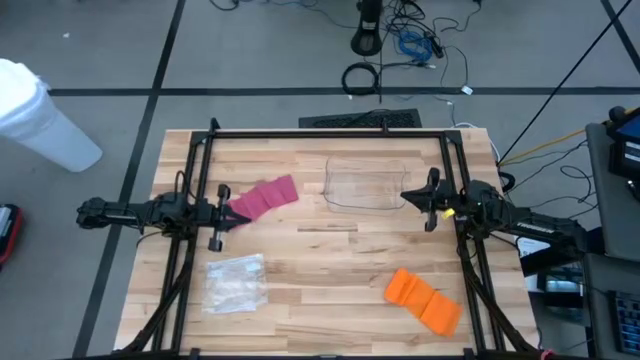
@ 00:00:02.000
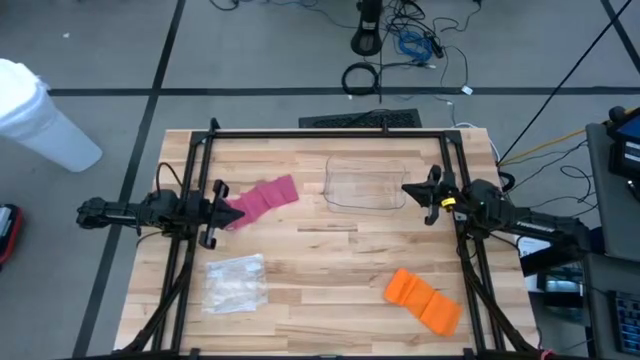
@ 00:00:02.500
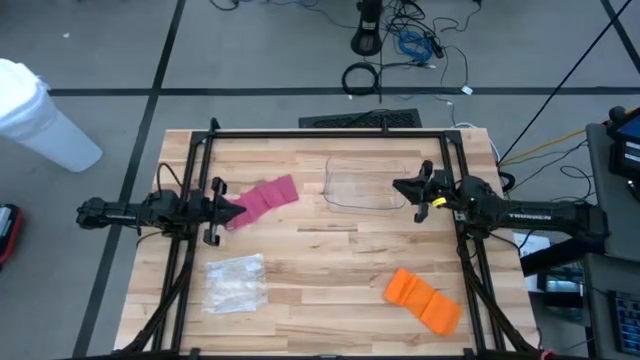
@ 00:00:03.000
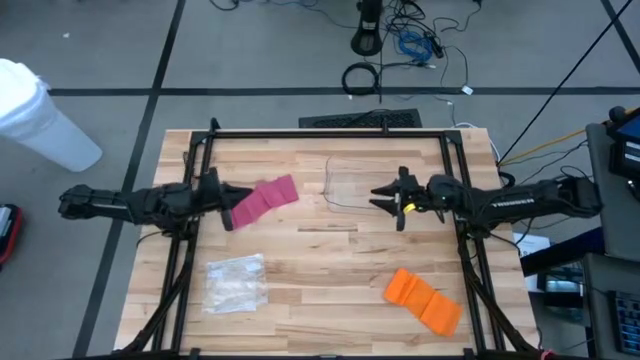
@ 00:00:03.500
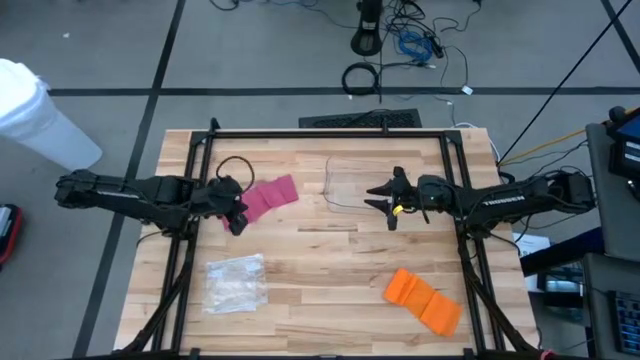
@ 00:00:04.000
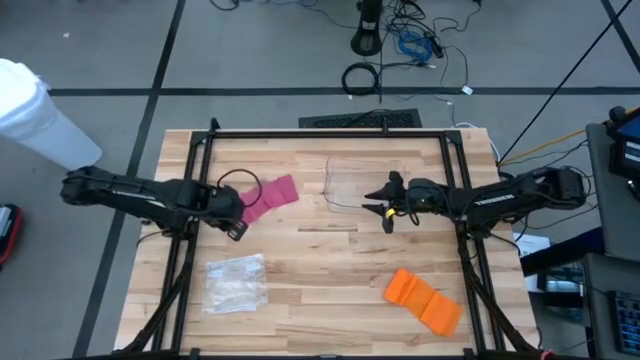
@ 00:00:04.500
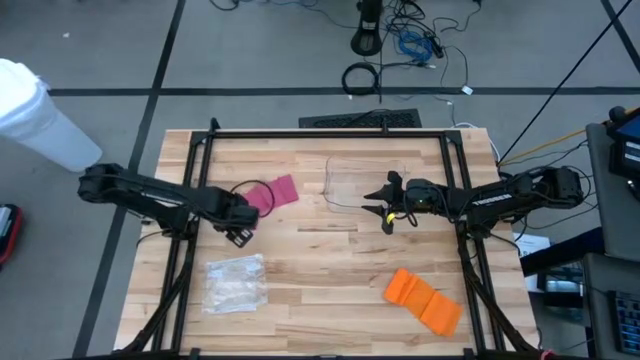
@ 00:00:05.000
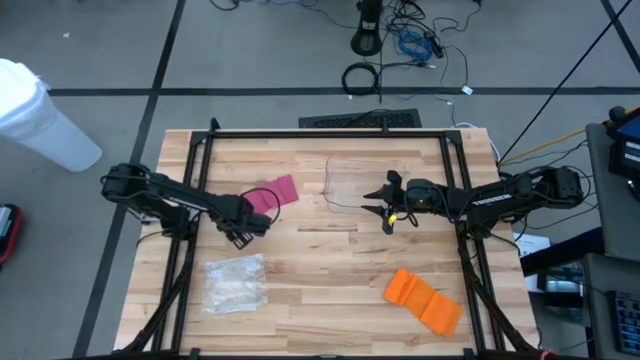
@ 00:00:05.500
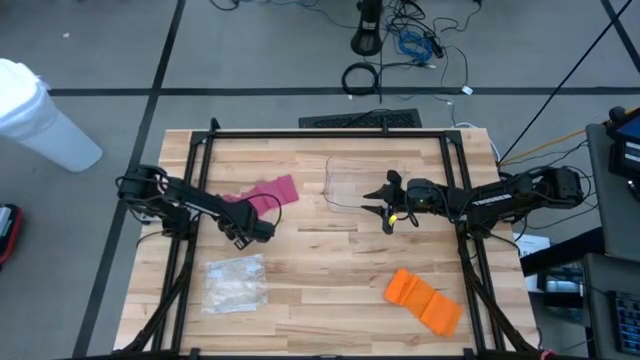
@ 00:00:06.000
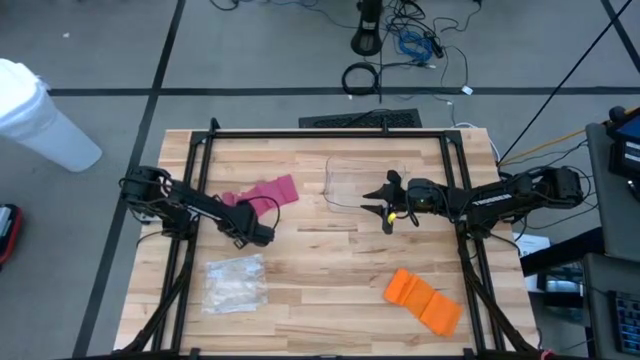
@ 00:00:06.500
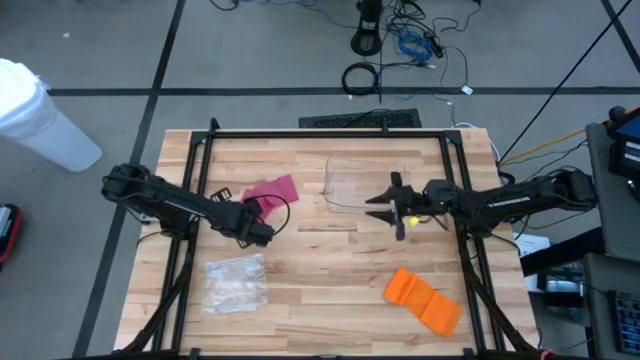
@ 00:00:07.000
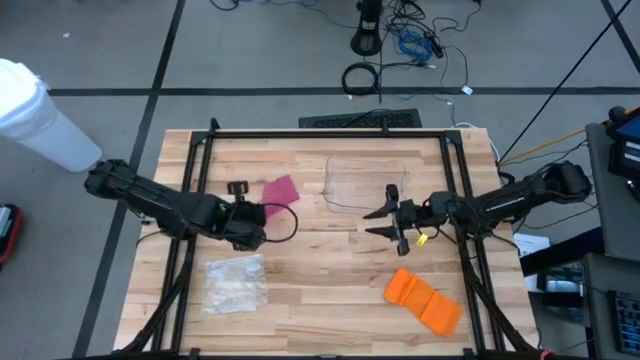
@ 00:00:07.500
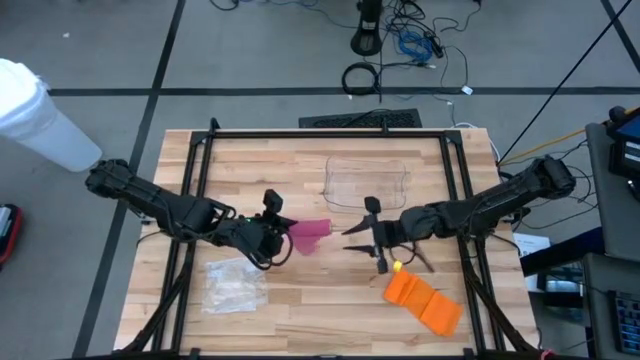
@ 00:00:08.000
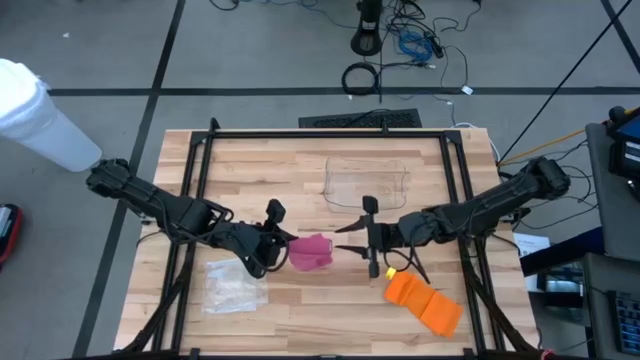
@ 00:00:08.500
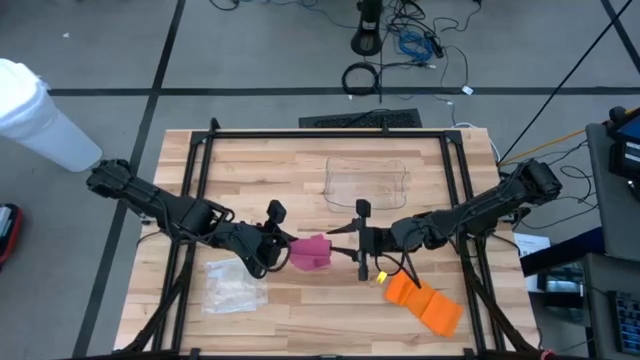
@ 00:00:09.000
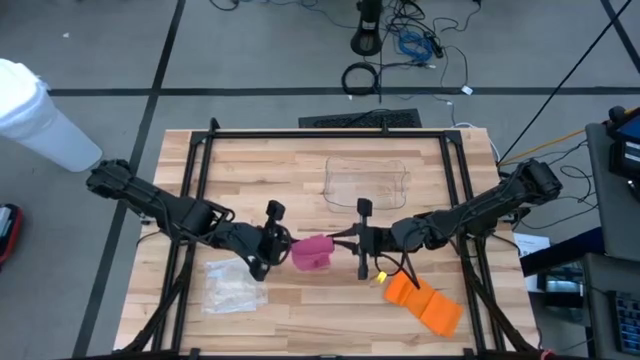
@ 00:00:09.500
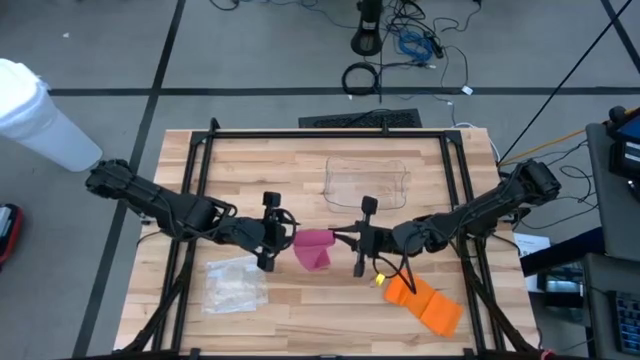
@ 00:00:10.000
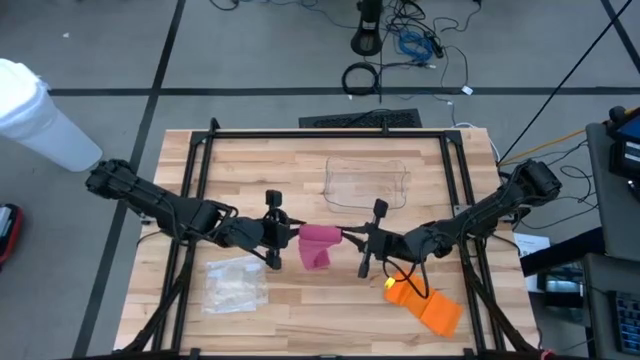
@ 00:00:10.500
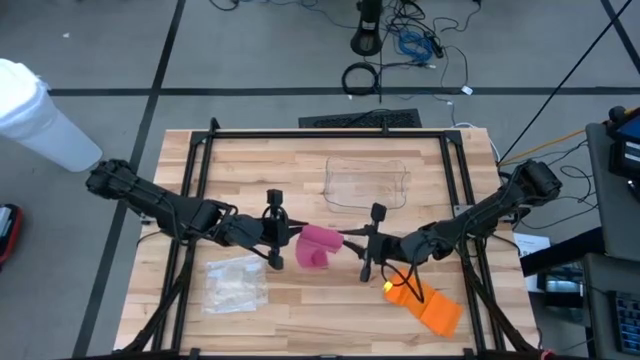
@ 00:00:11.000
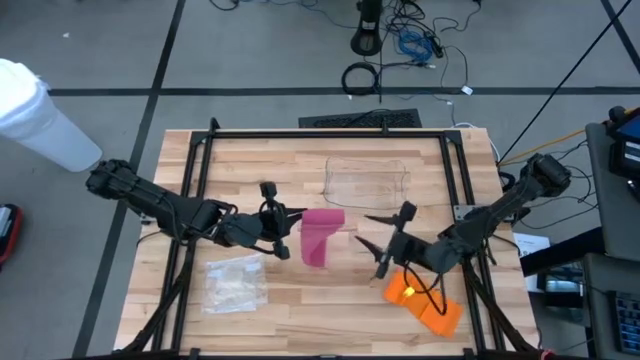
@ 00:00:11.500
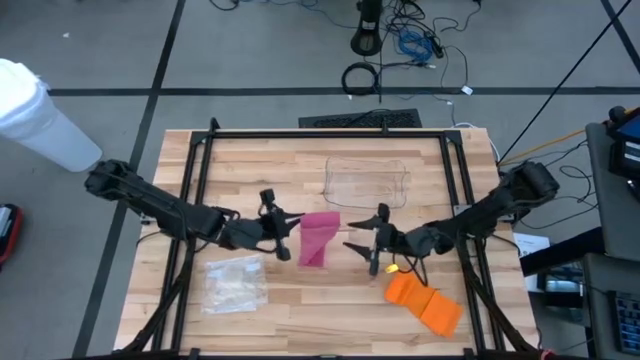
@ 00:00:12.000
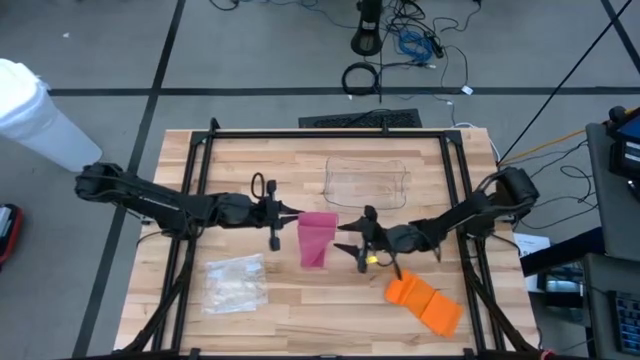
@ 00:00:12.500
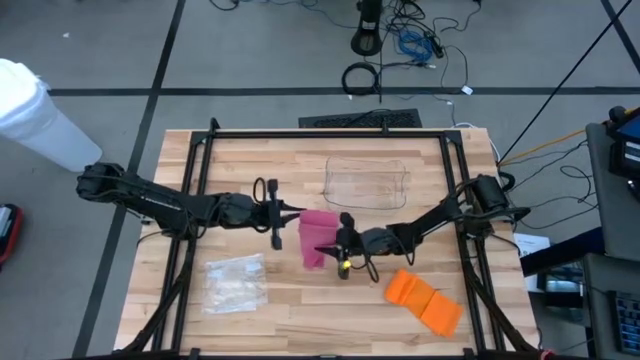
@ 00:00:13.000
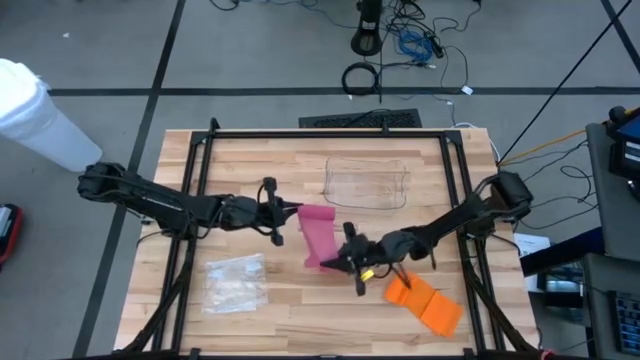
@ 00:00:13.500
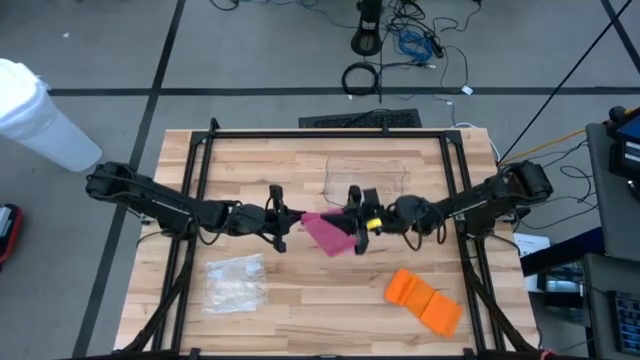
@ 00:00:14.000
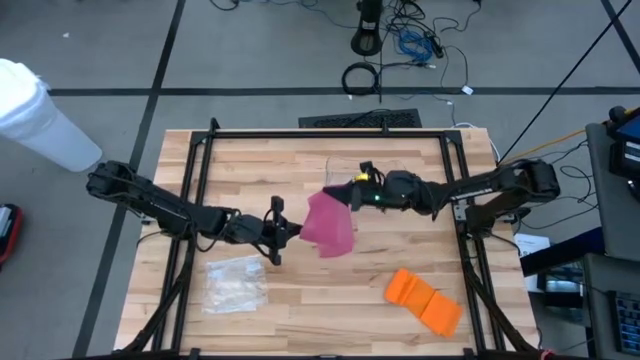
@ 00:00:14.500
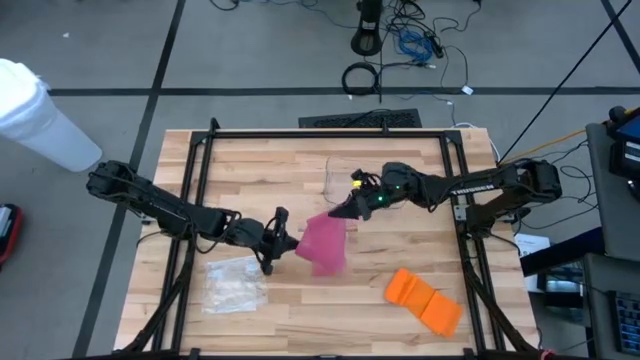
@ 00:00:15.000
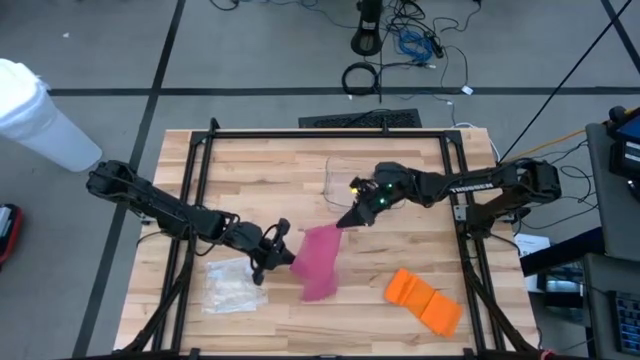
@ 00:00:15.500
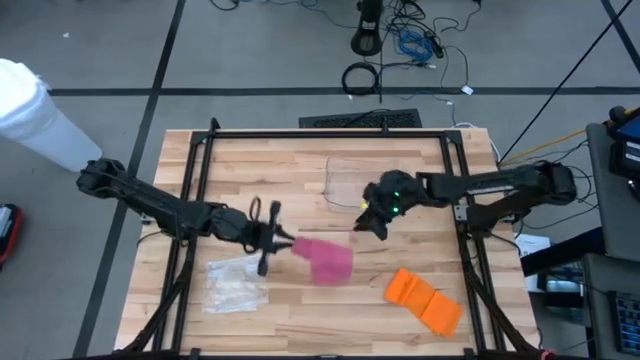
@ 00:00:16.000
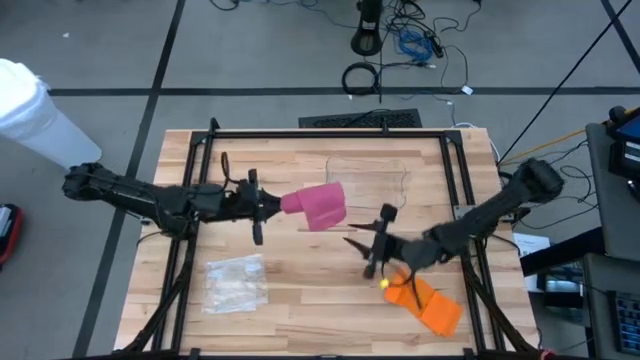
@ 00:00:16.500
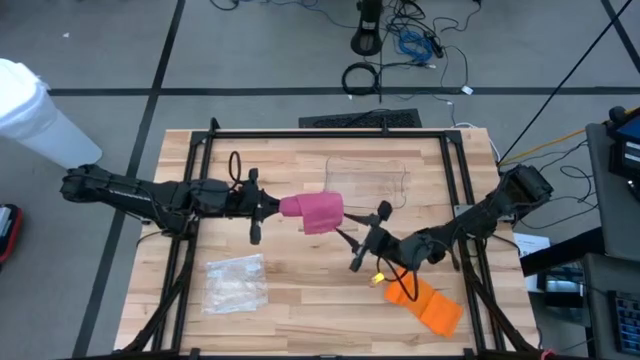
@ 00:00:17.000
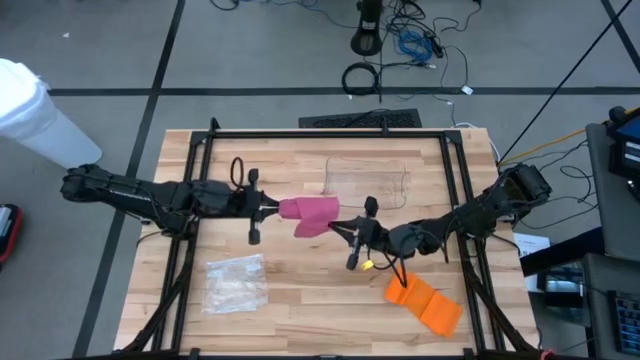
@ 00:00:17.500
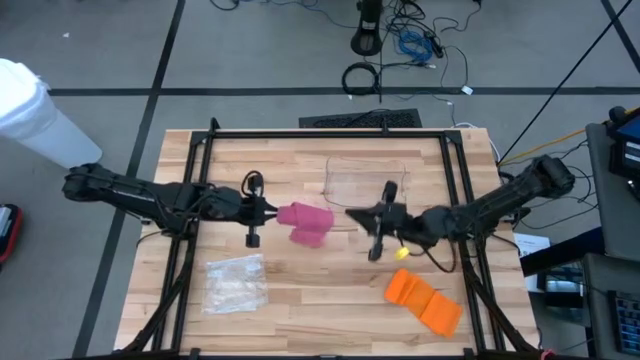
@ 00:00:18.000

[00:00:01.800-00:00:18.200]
Task: Roll bandage
Roll the pink bandage

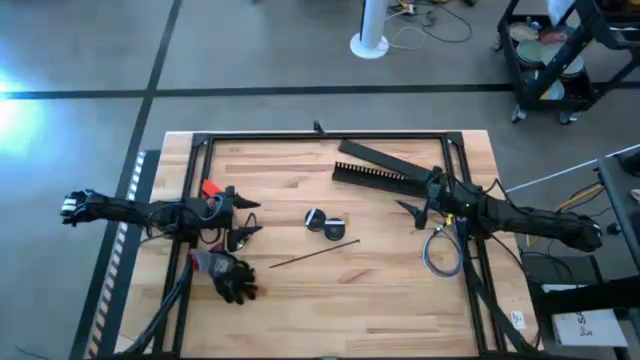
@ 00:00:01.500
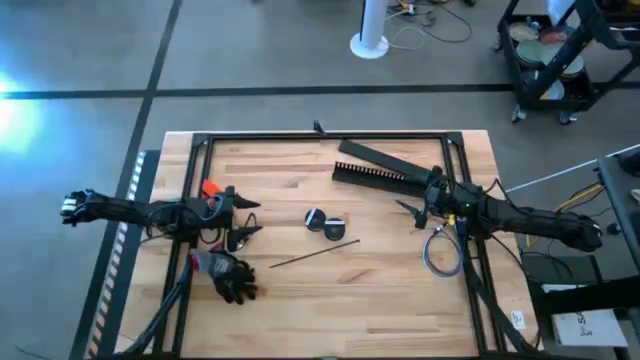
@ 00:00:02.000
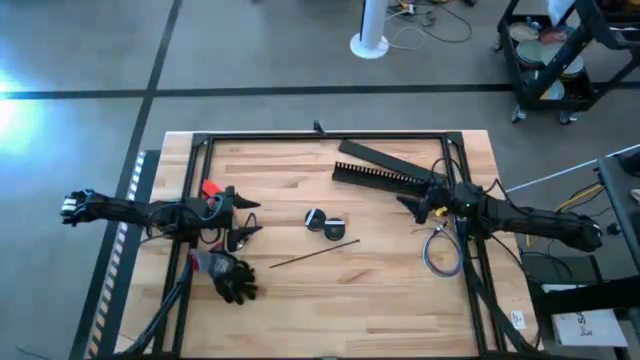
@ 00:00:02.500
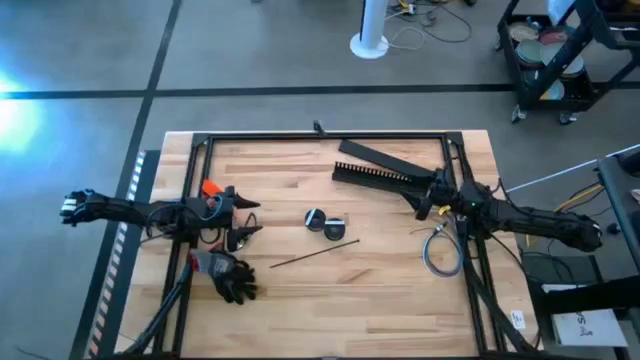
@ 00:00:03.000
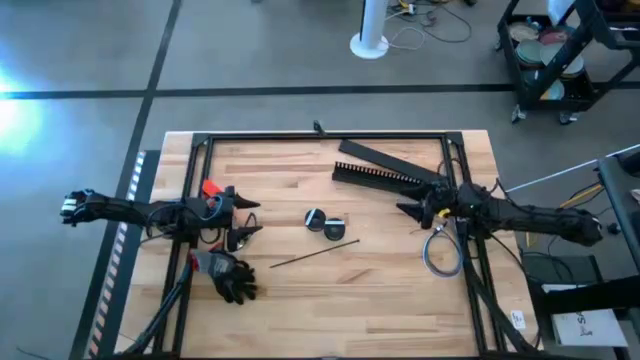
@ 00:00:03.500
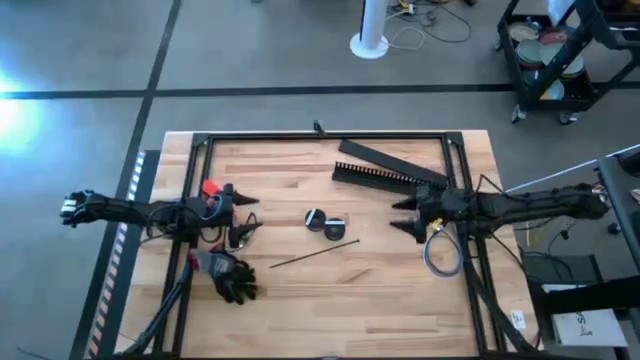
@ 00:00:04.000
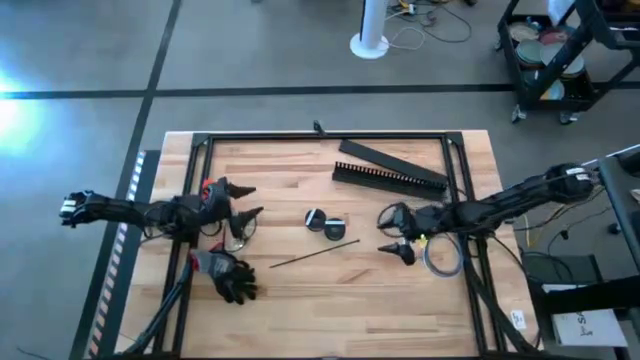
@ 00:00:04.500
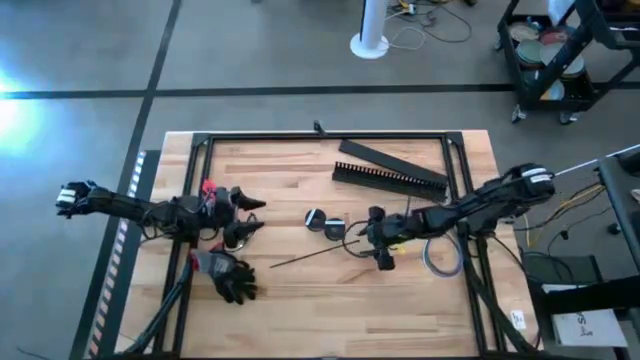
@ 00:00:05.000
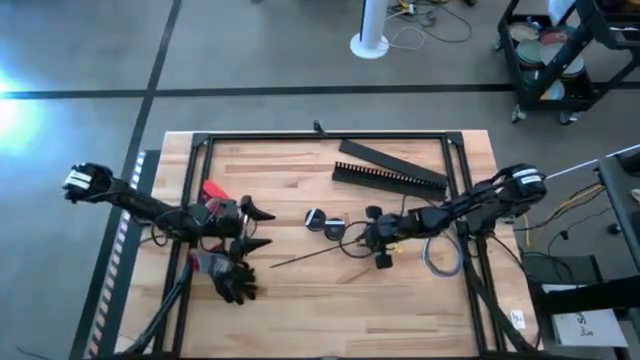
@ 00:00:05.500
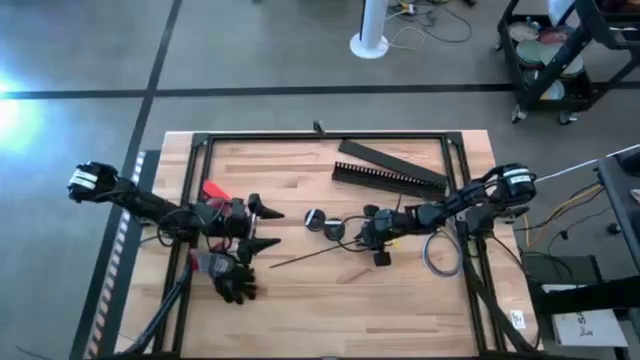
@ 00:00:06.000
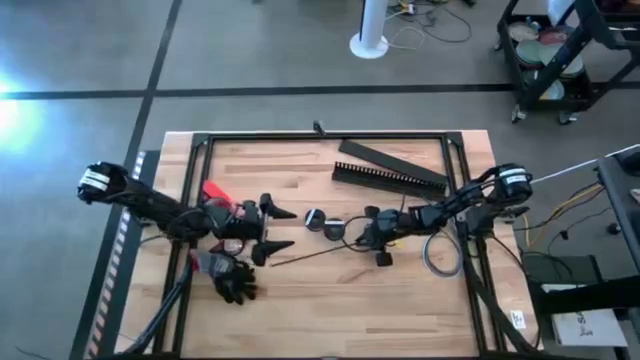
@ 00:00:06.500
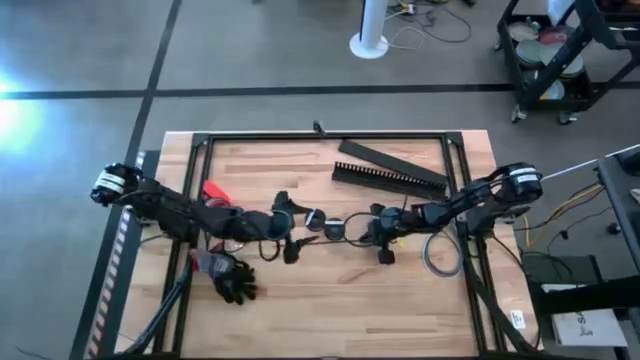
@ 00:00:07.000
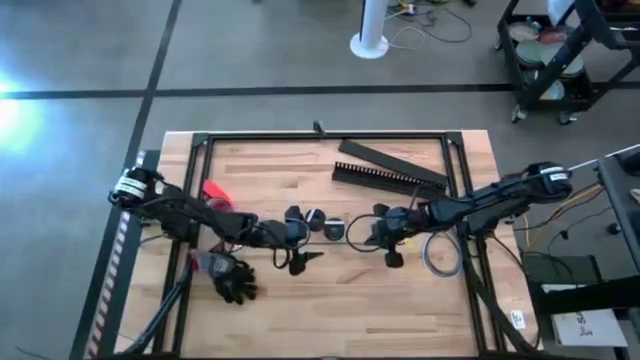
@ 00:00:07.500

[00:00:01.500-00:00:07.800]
Task: Ziptie cables
Prepare the black zip tie
